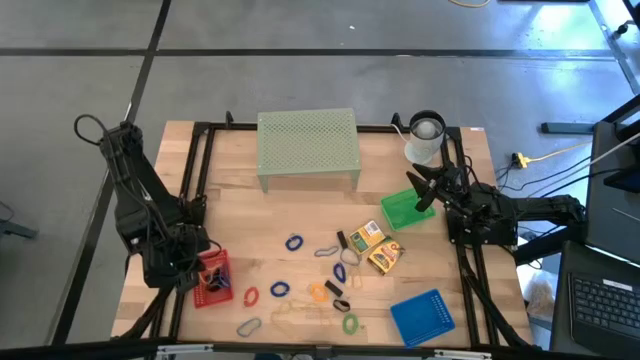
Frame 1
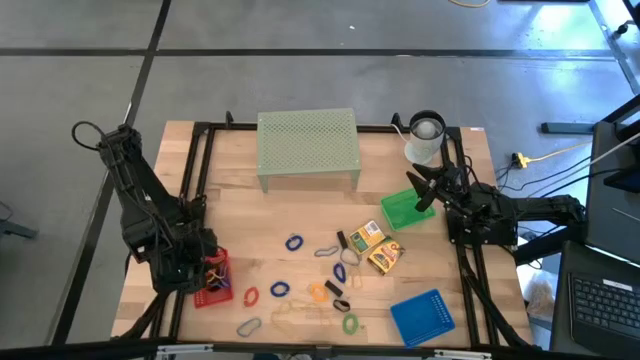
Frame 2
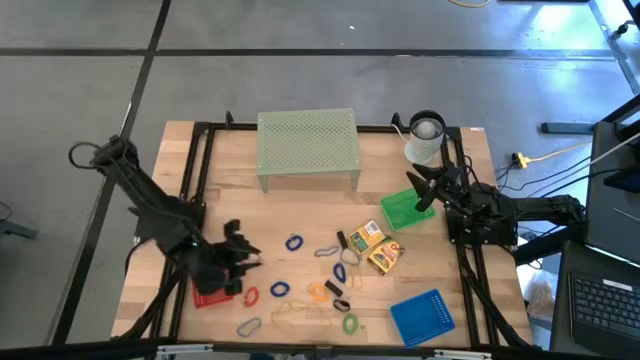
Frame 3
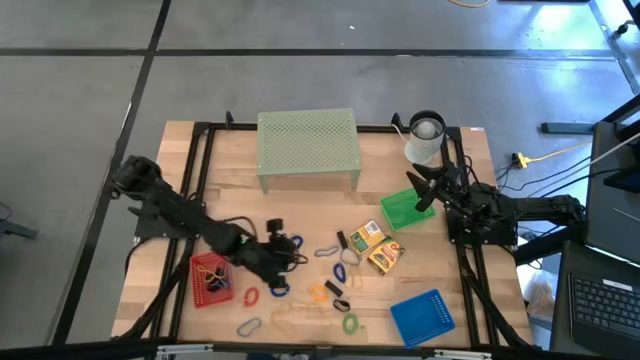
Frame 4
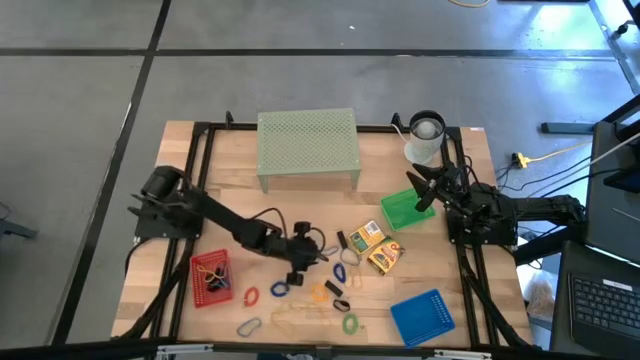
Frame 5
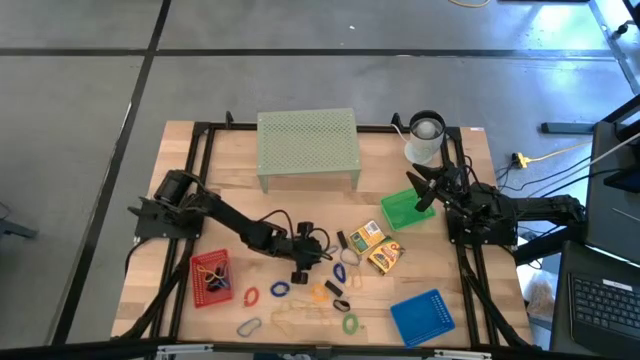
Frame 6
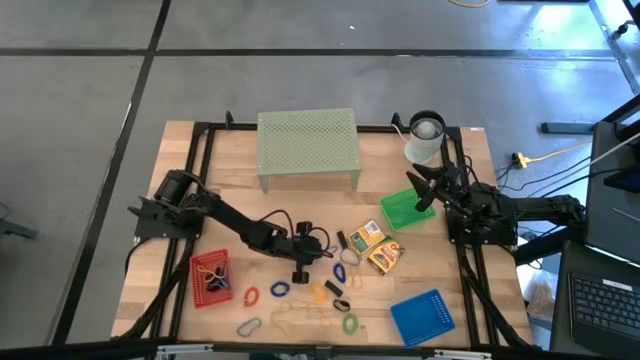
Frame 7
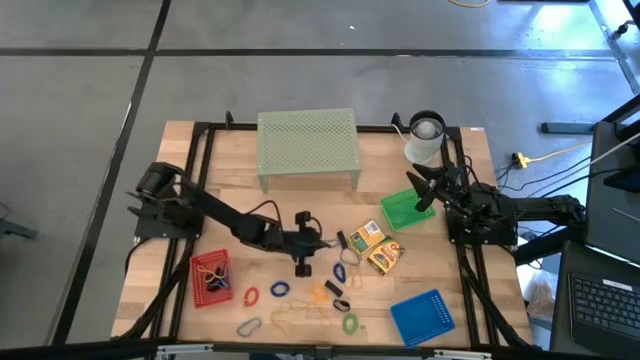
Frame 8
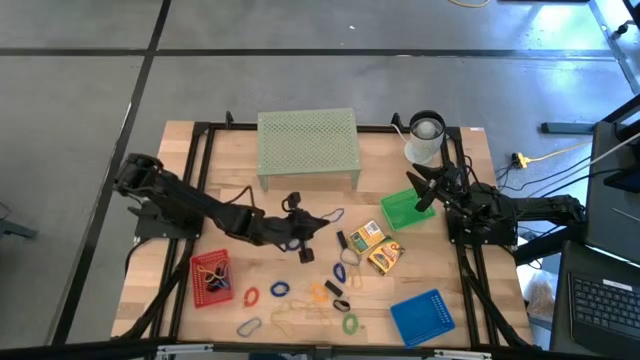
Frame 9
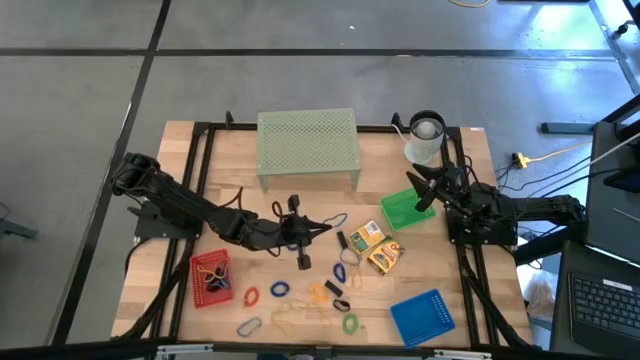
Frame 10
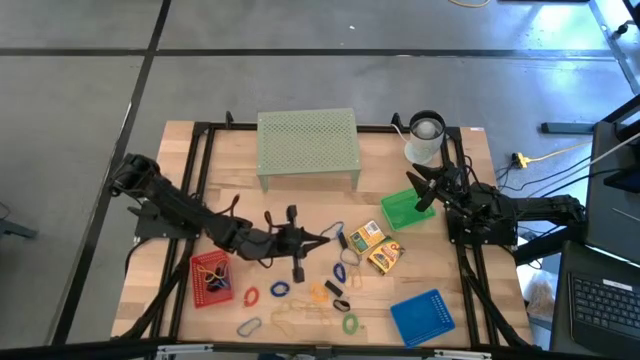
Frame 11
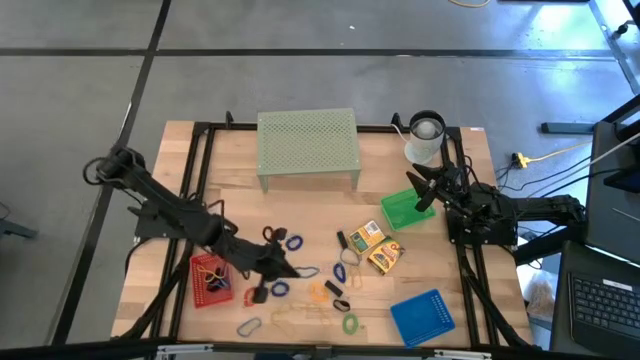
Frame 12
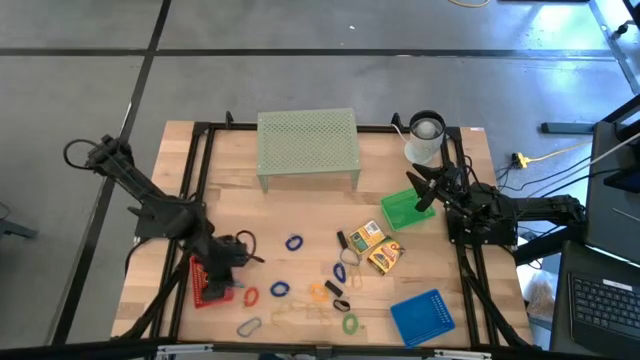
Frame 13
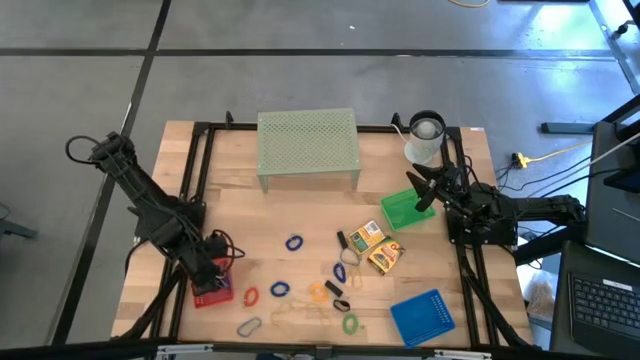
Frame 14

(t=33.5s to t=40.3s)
Task: Pick & Place Office Desk Supplies
Put the blue rubber band into the red bin

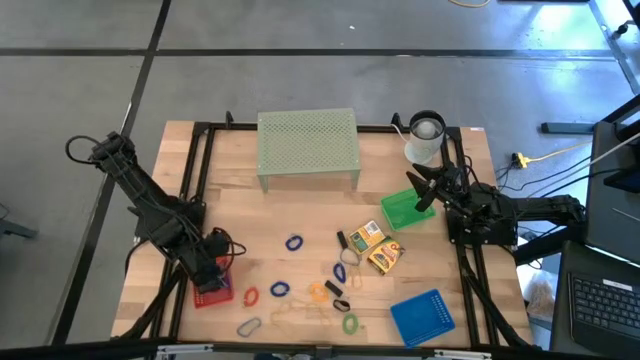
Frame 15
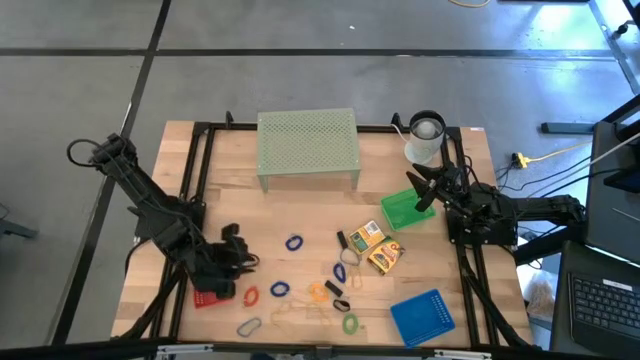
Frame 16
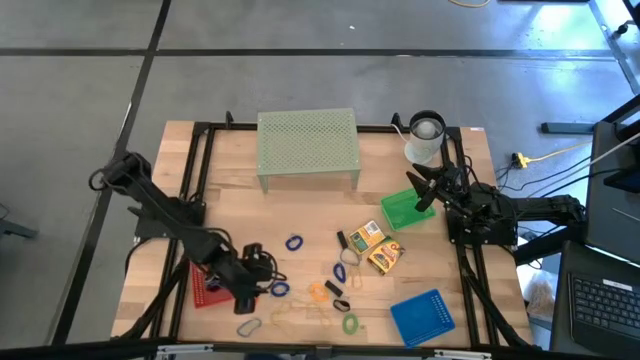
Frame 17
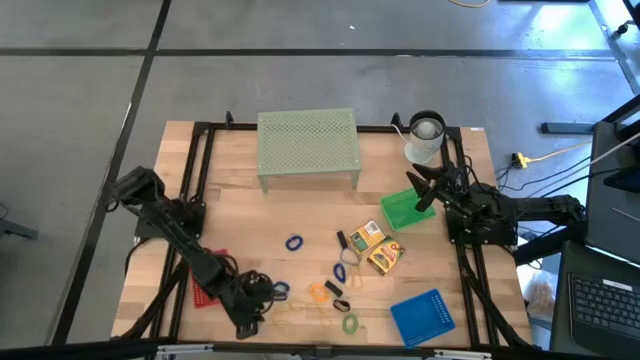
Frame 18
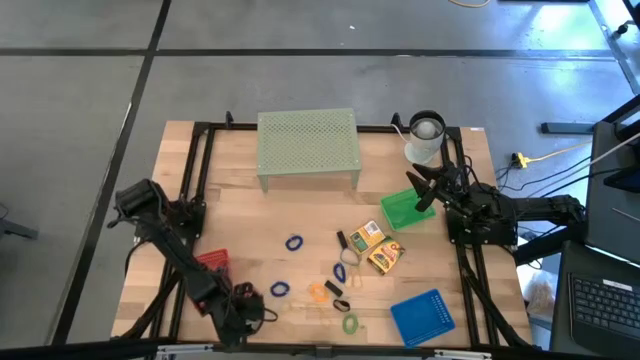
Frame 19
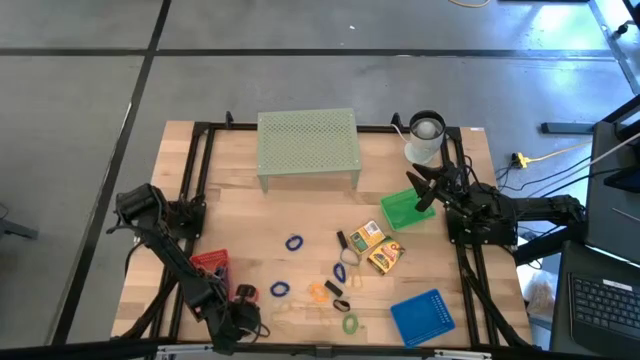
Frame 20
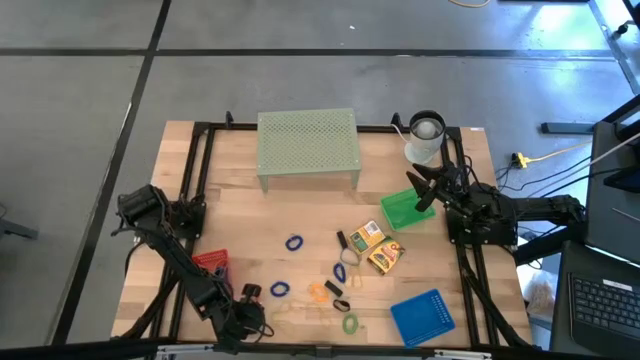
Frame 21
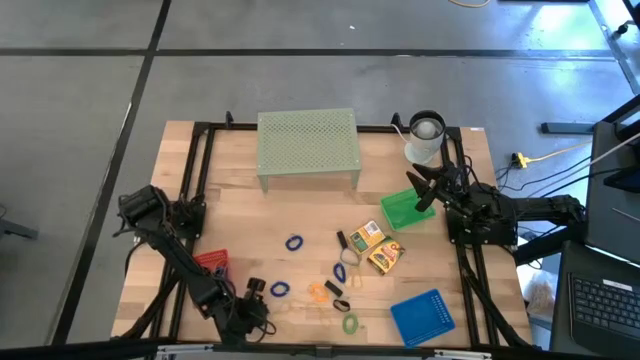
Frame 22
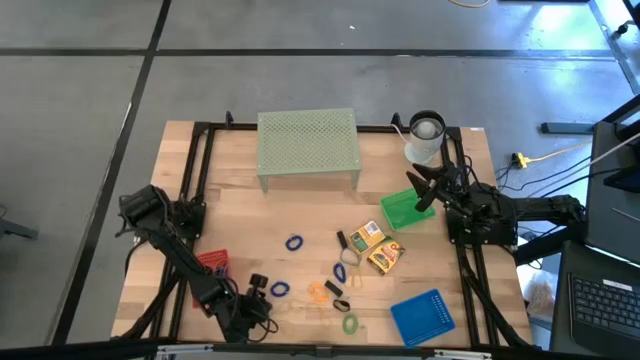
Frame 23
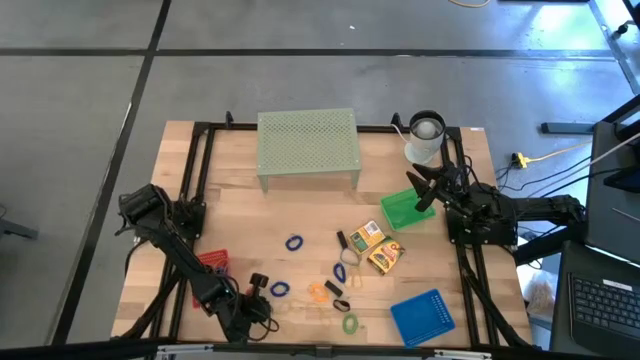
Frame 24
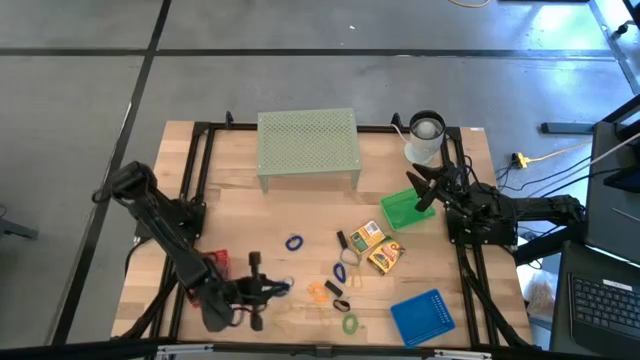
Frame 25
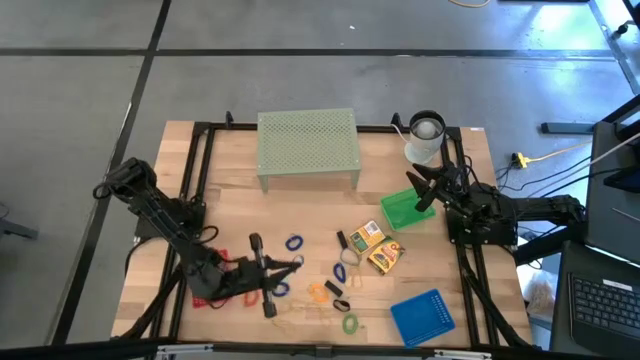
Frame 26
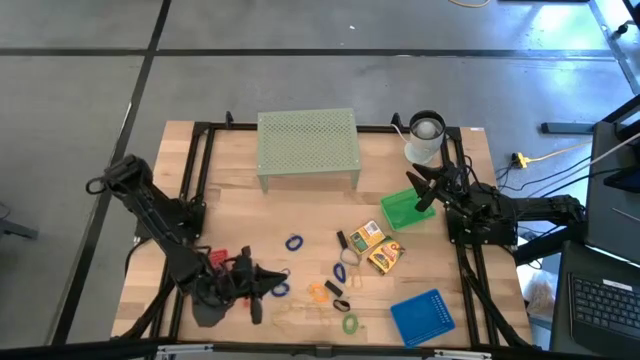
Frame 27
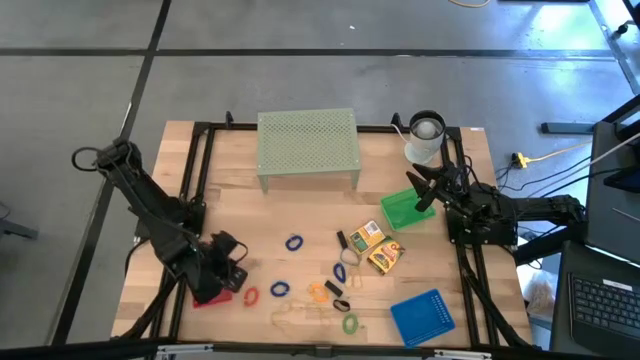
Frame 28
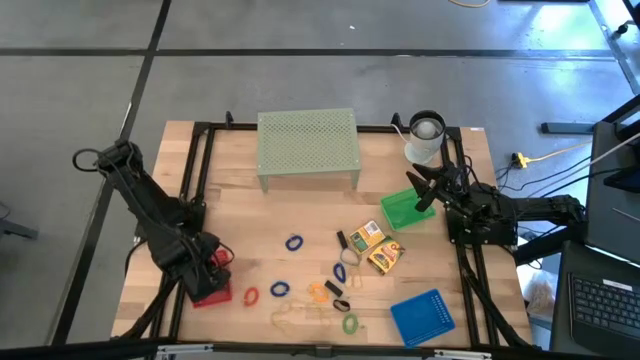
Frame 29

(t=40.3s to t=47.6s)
Put the blue rubber band into the red bin

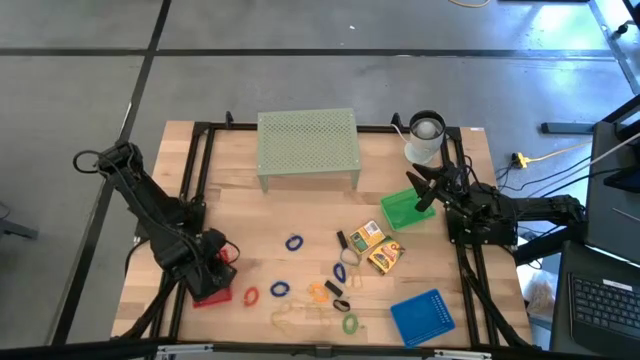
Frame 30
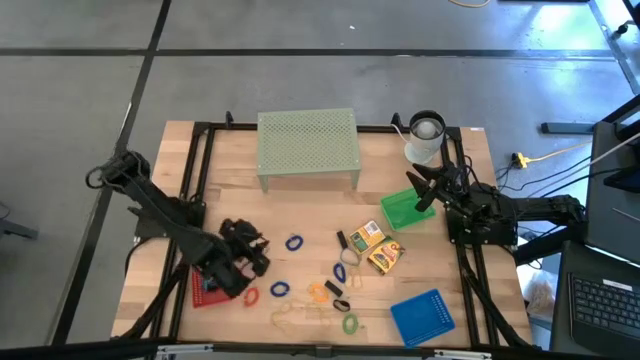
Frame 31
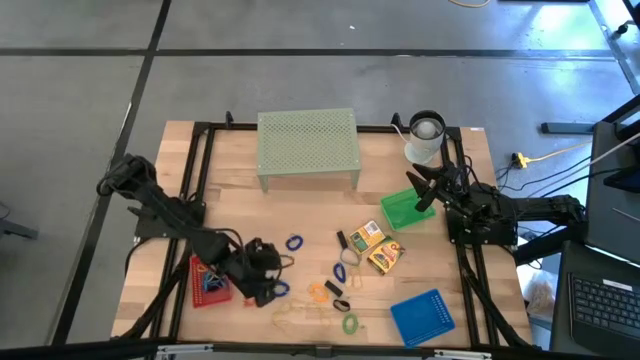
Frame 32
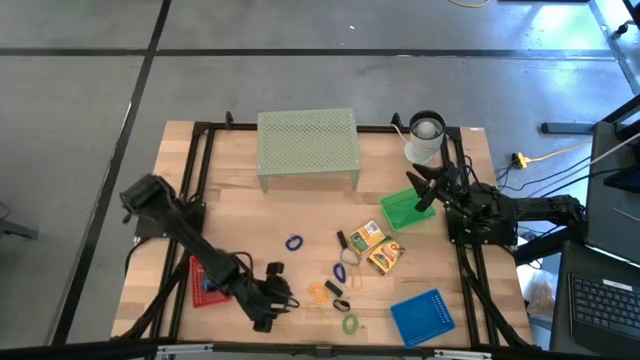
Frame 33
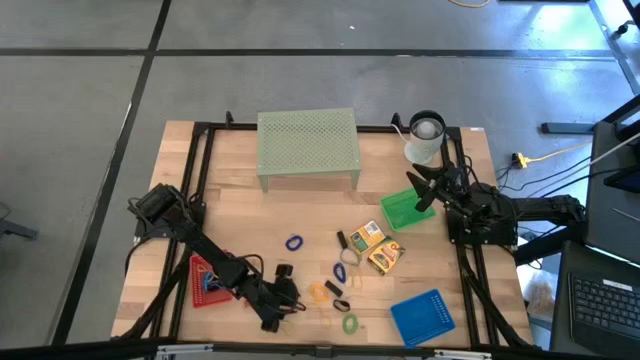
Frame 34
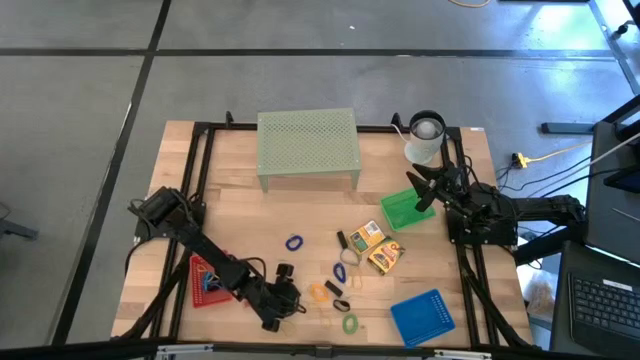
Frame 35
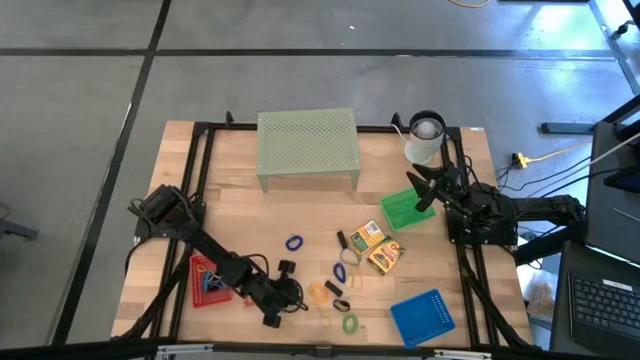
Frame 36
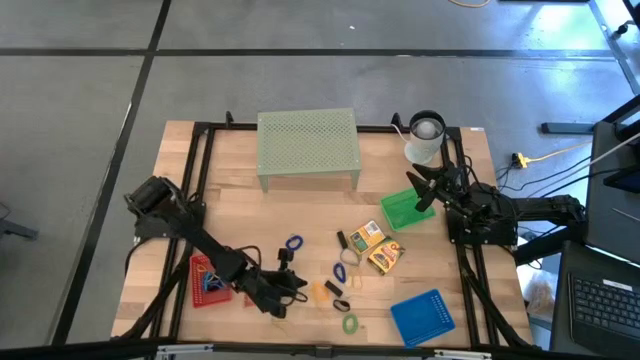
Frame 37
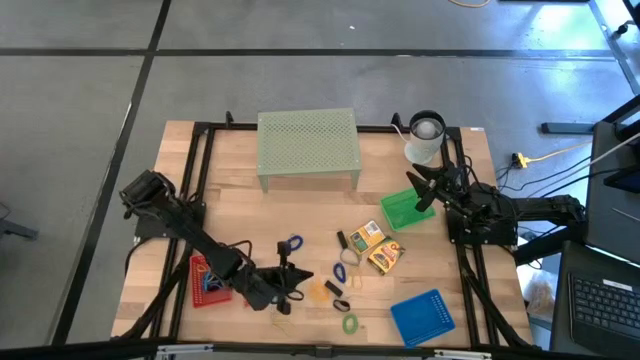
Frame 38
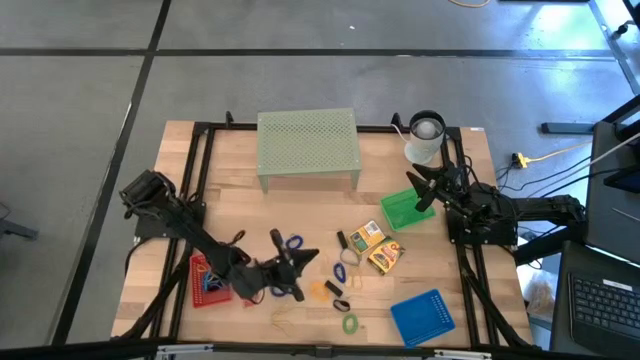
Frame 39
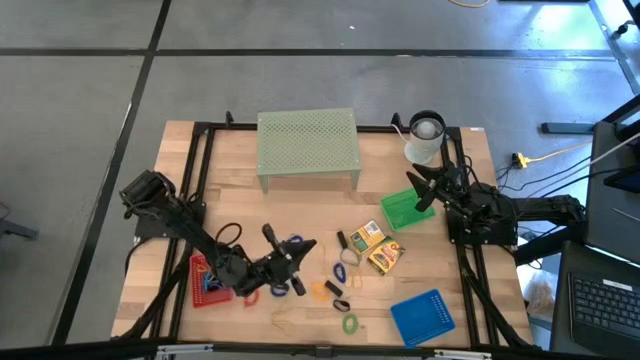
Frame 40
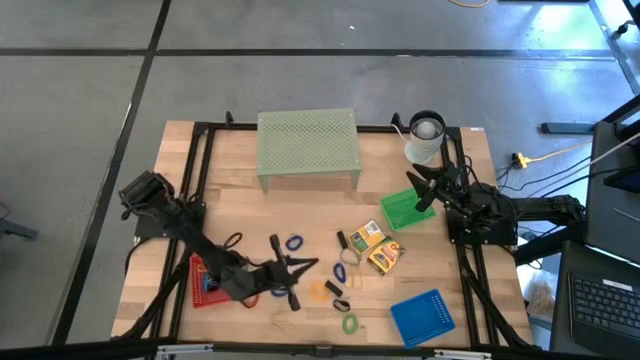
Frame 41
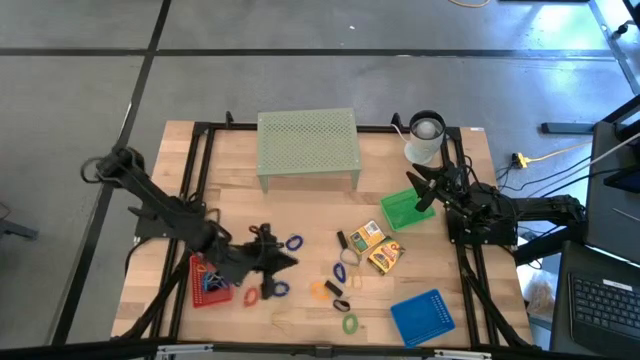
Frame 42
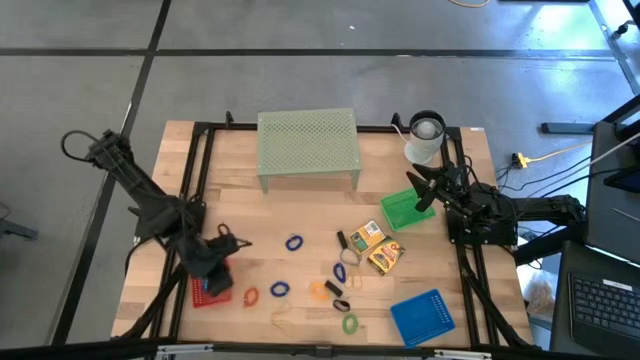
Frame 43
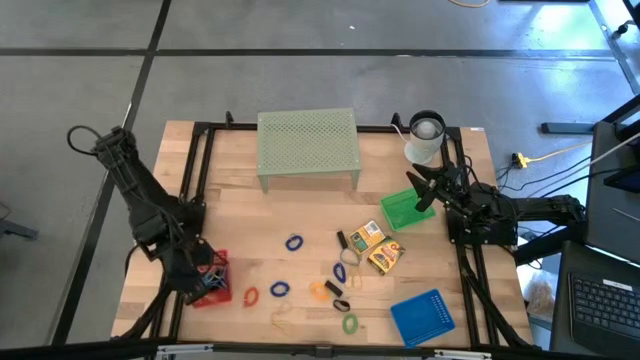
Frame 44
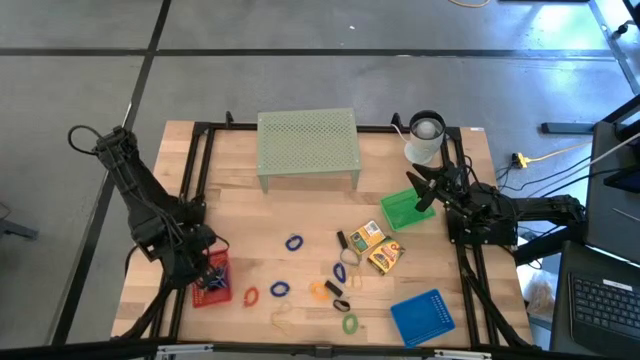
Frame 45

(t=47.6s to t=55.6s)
Put the yellow rubber band into the red bin
